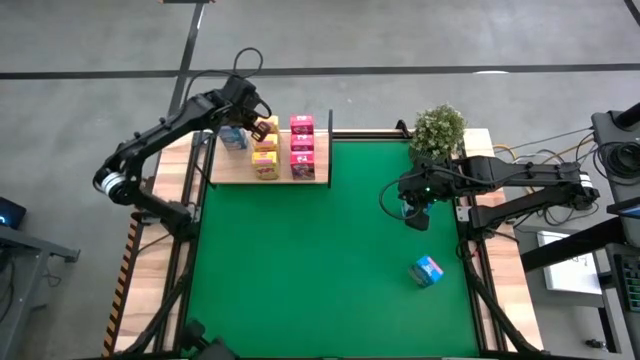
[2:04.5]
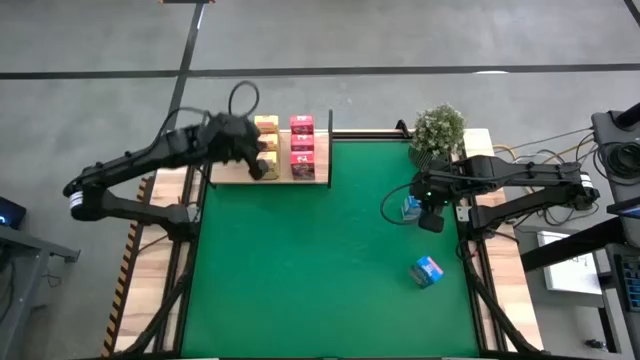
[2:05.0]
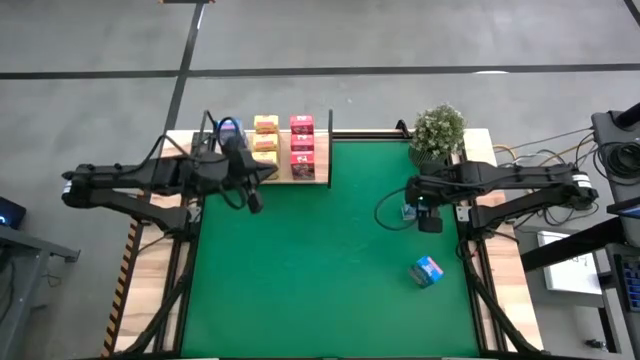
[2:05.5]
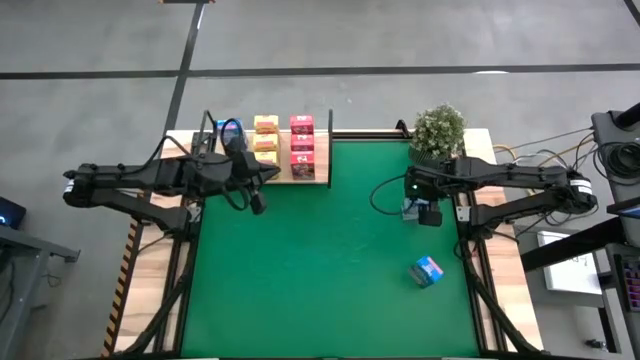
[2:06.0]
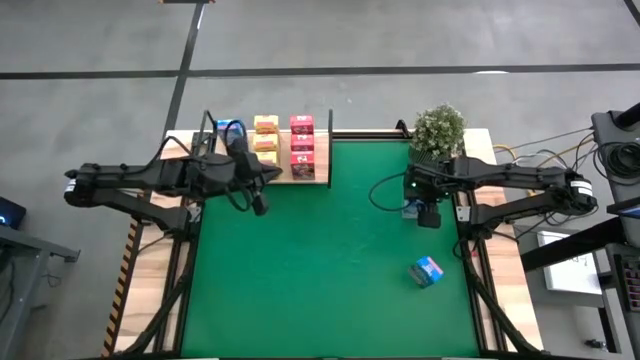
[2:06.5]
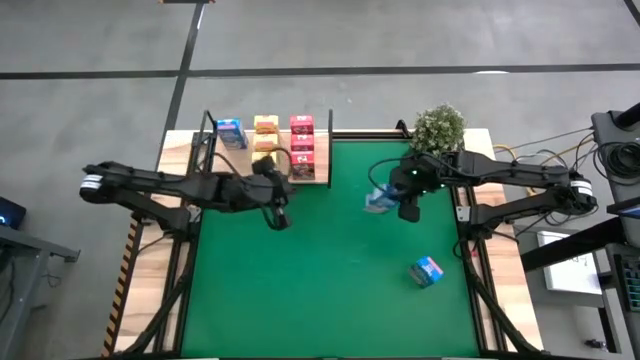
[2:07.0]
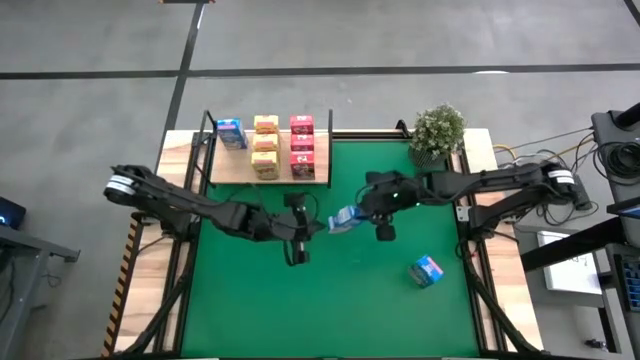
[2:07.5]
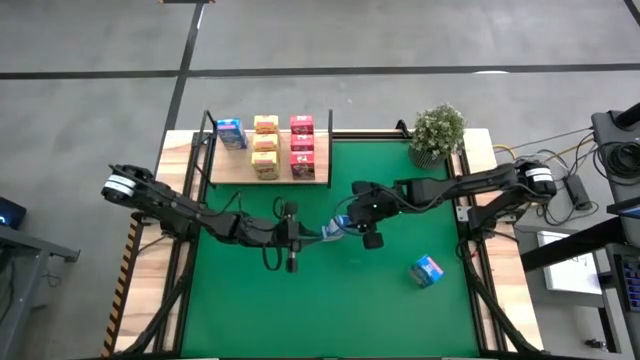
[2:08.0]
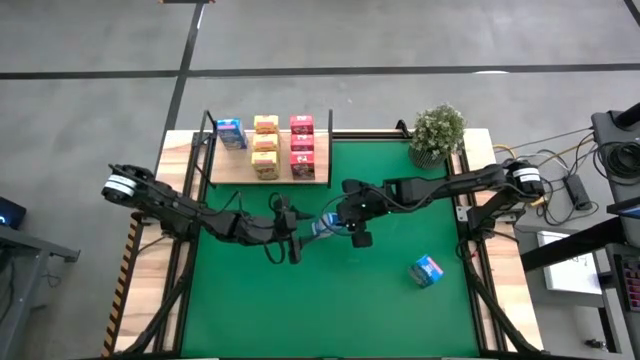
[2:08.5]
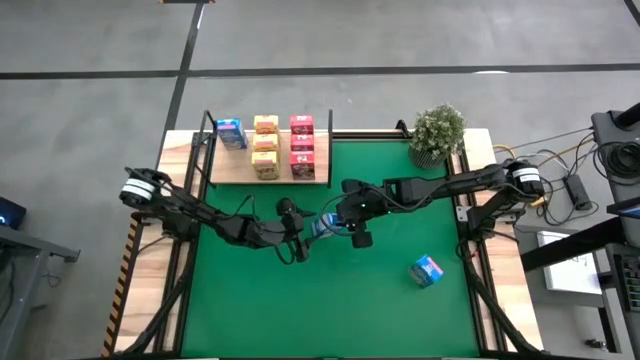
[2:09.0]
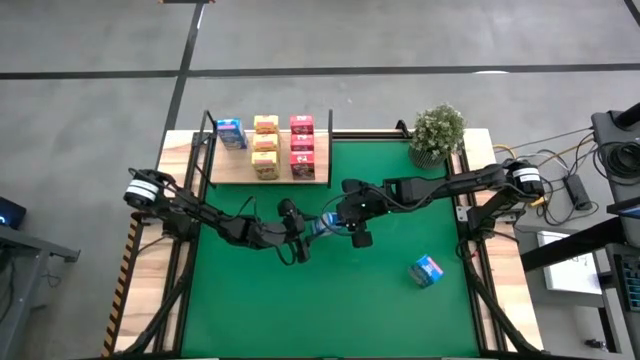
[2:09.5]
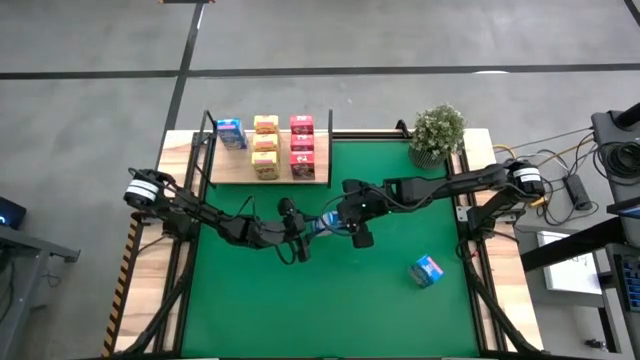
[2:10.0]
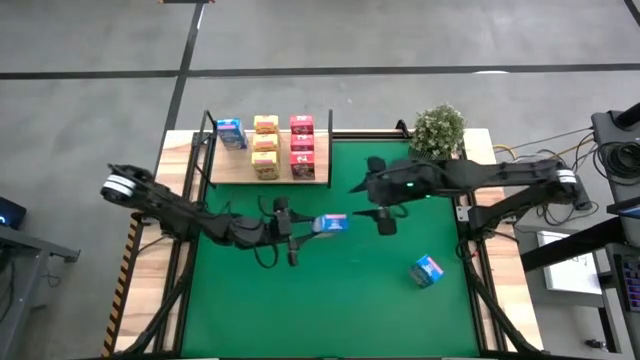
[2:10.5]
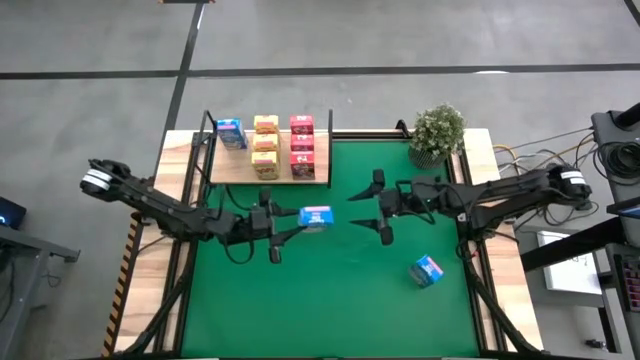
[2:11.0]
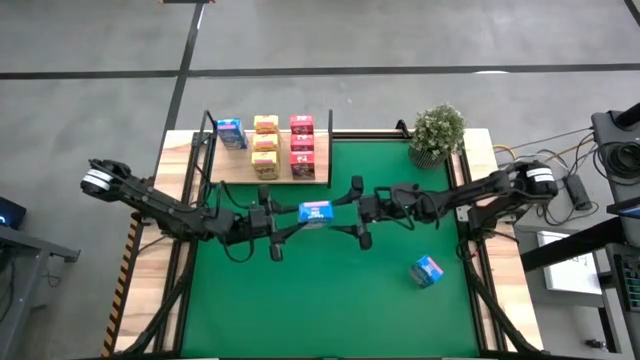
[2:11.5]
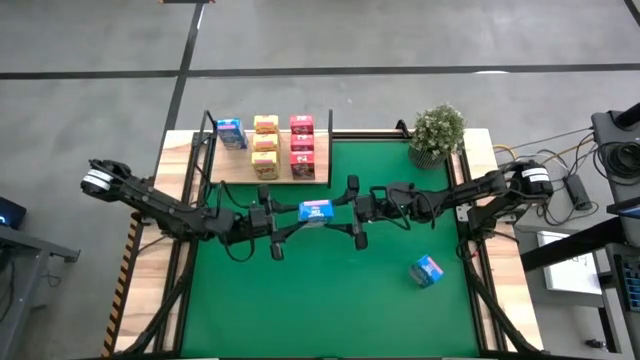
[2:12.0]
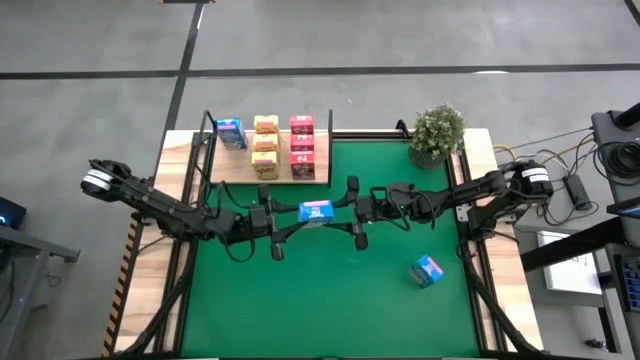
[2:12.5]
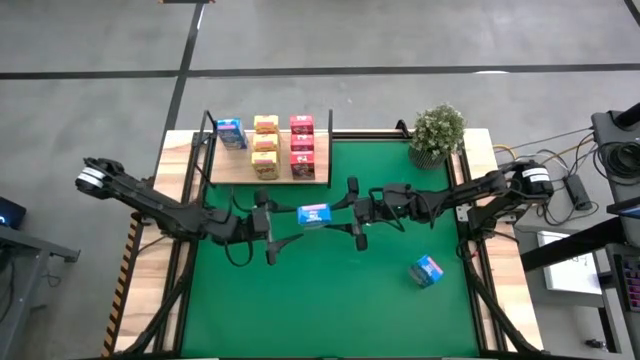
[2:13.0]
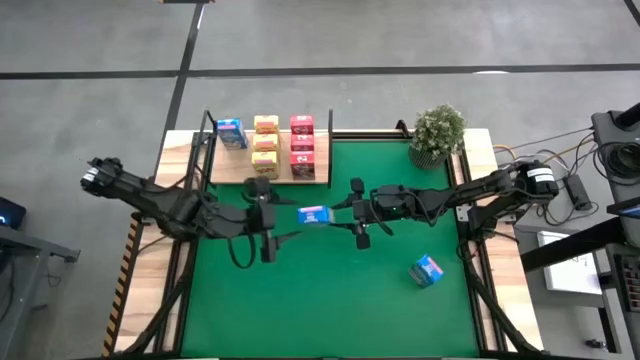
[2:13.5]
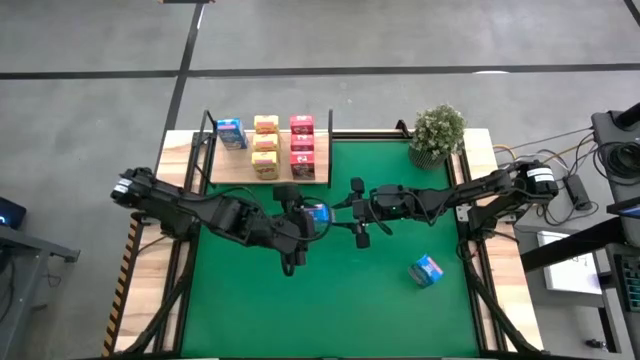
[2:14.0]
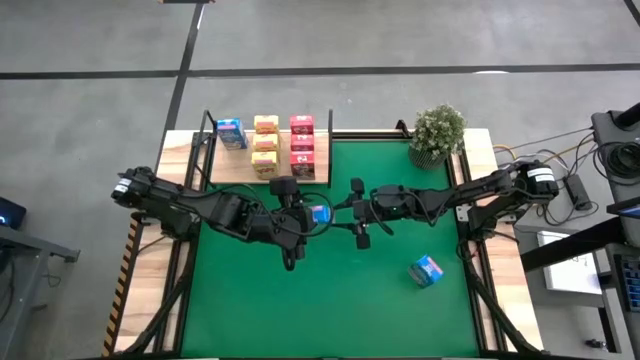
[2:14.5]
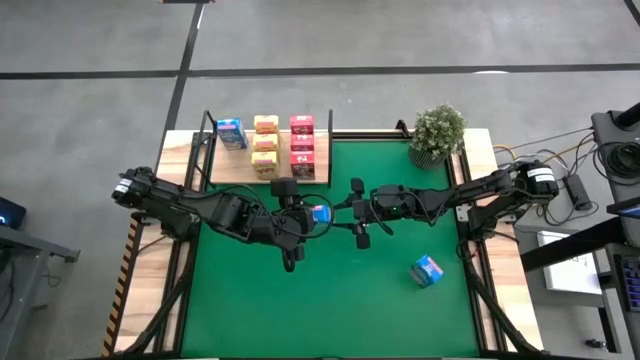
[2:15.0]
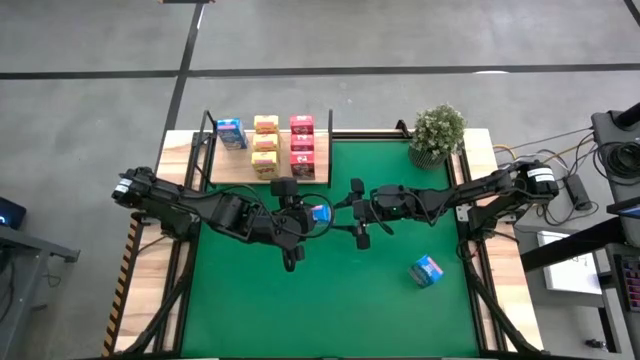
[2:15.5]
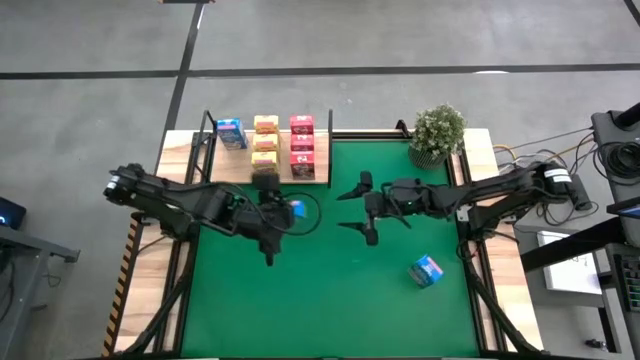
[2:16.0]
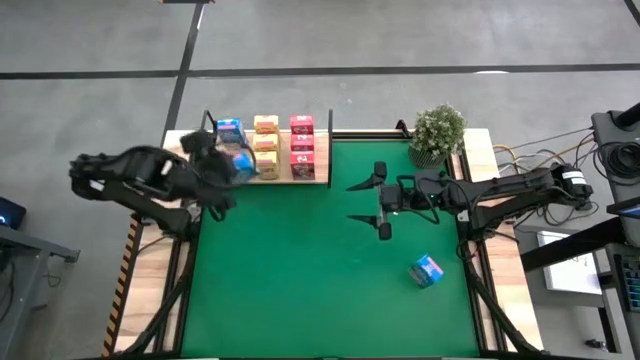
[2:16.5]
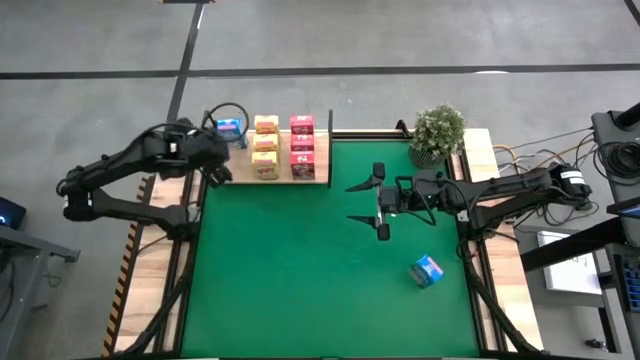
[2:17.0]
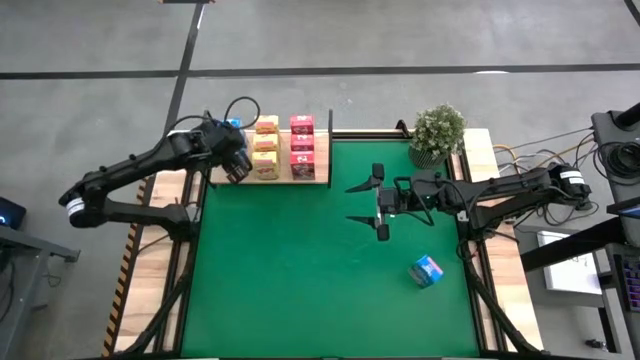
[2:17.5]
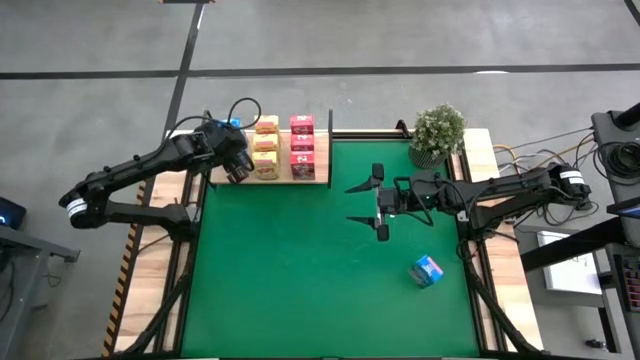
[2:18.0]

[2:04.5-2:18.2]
Task: Stack cereal on shelf
Put the top blue cereal box aligned with the blue cereal box on the shelf

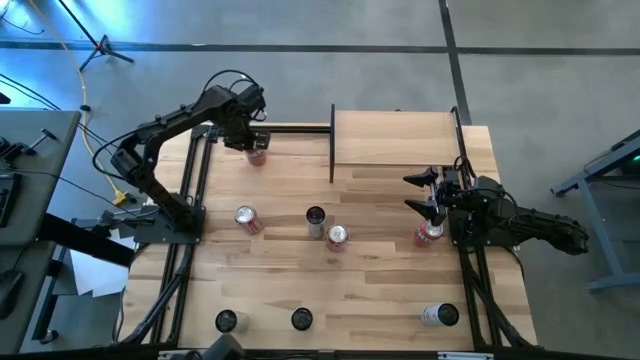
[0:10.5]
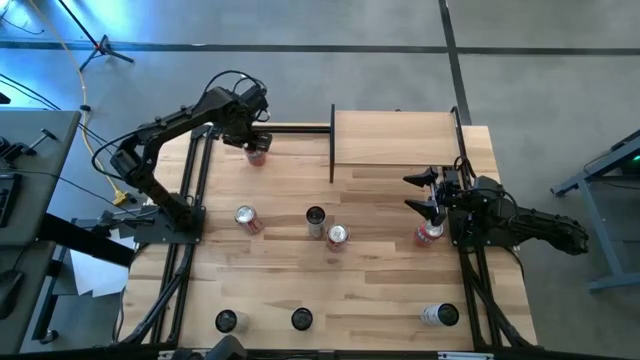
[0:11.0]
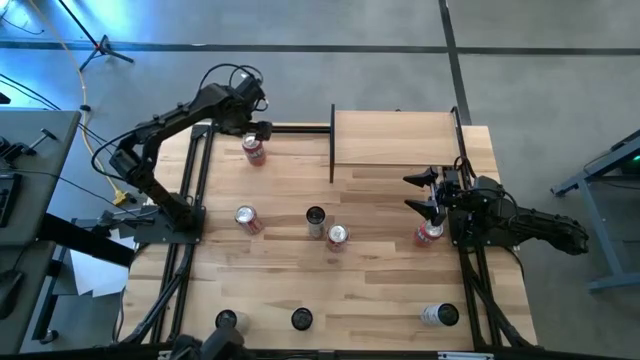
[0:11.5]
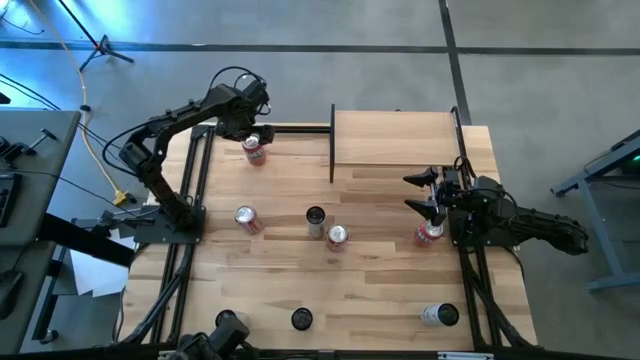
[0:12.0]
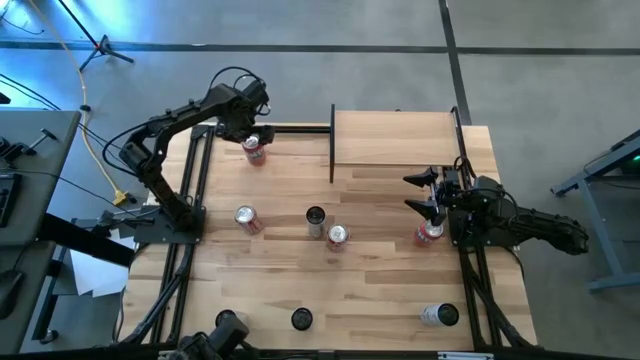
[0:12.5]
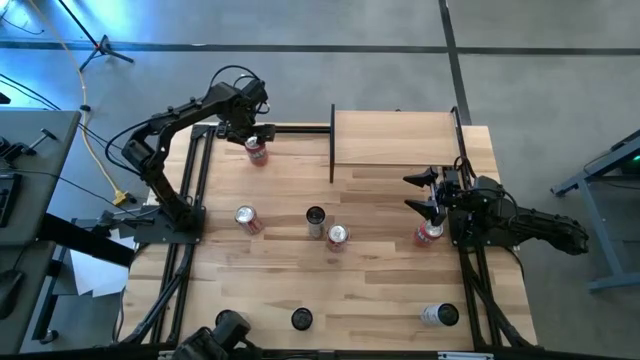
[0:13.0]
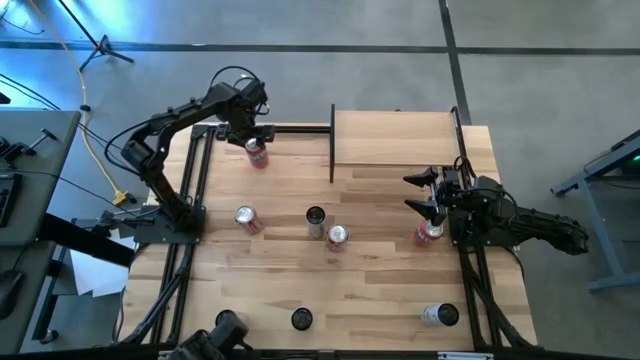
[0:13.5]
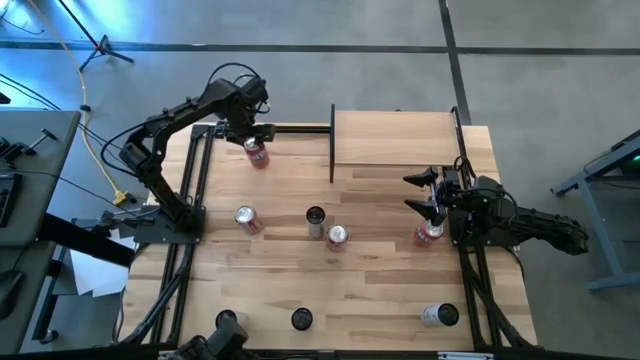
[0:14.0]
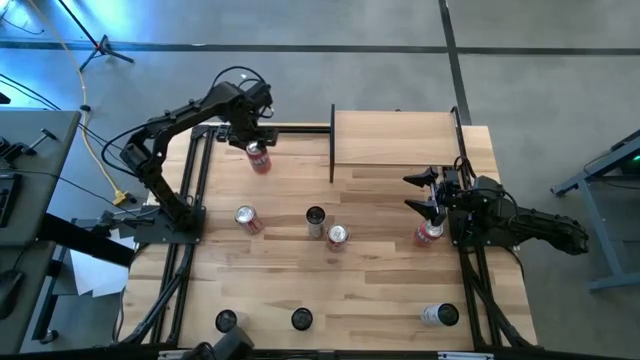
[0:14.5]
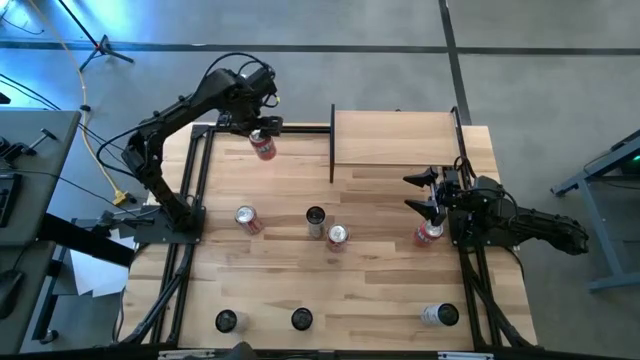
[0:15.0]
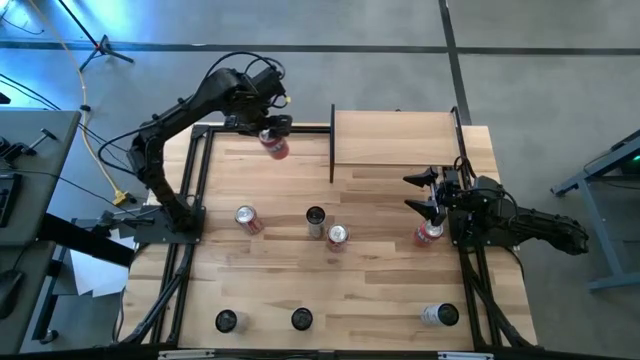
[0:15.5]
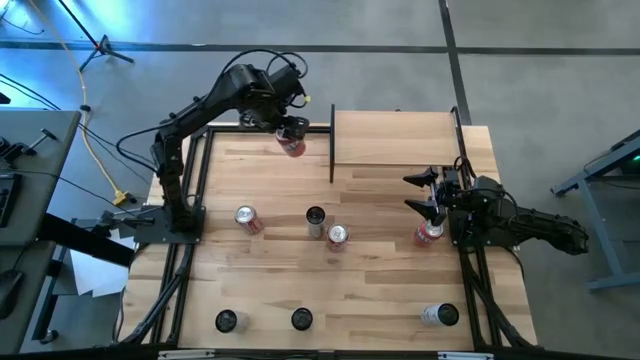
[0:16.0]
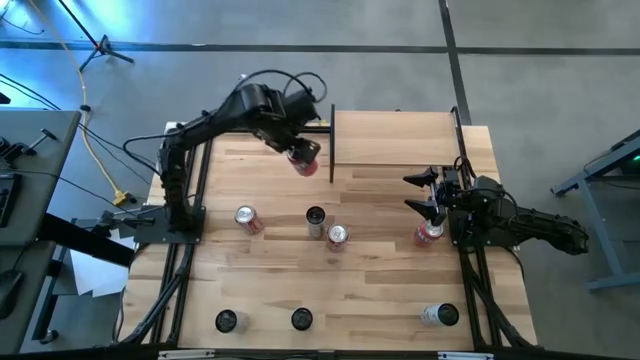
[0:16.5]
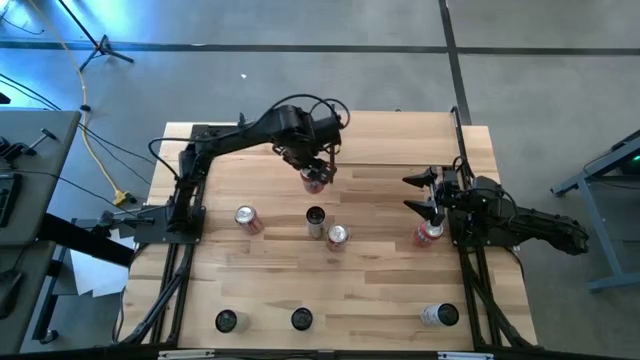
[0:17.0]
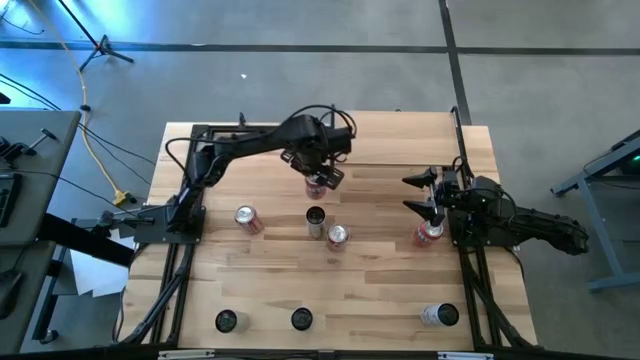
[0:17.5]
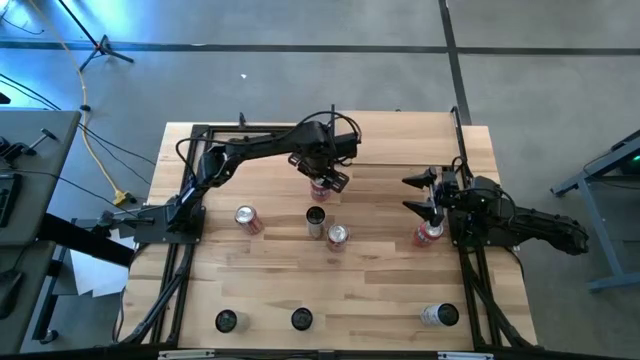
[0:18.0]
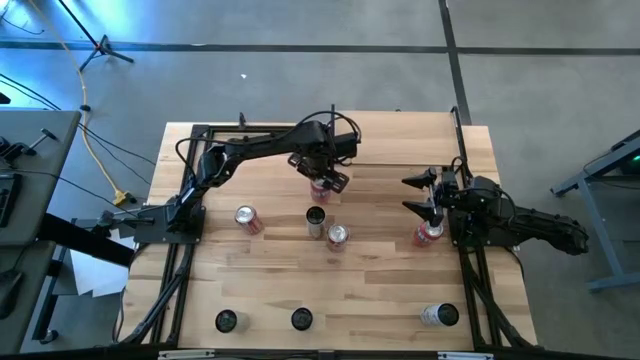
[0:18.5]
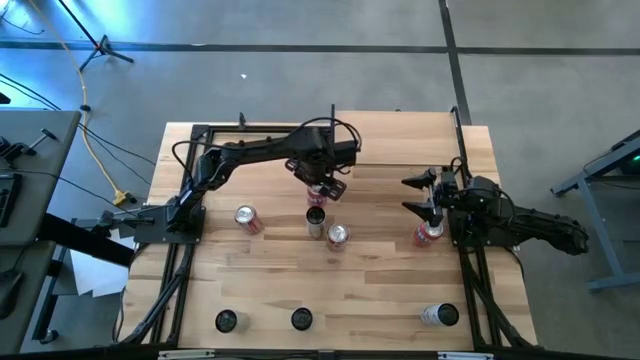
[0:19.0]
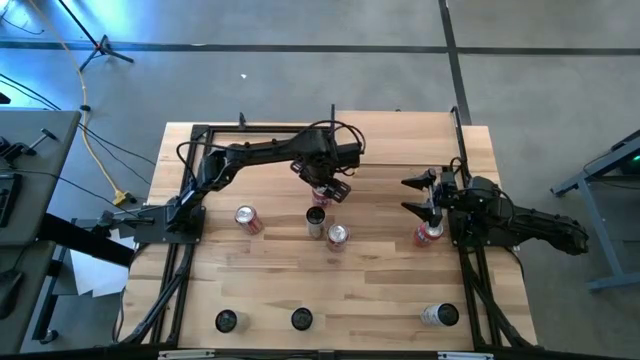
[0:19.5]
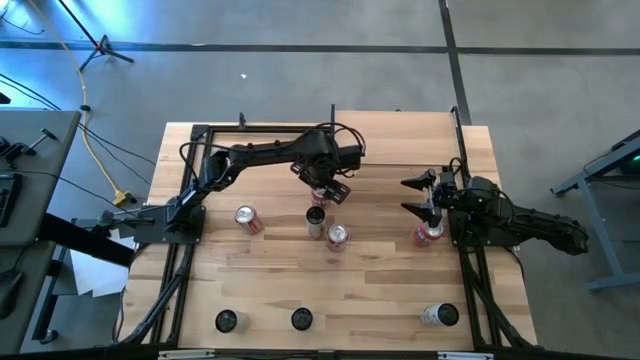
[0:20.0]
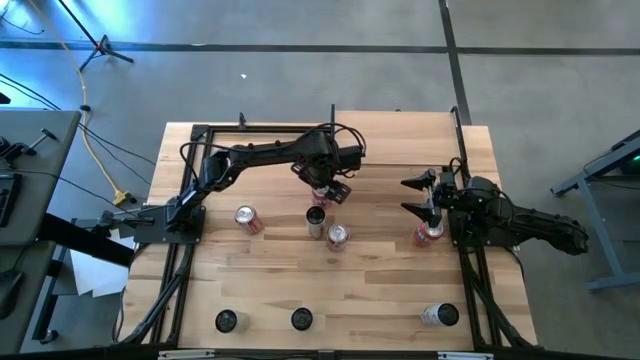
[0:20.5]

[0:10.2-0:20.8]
Task: Place canned beverage on shelf
Move the left red soda can to the middle of the table
